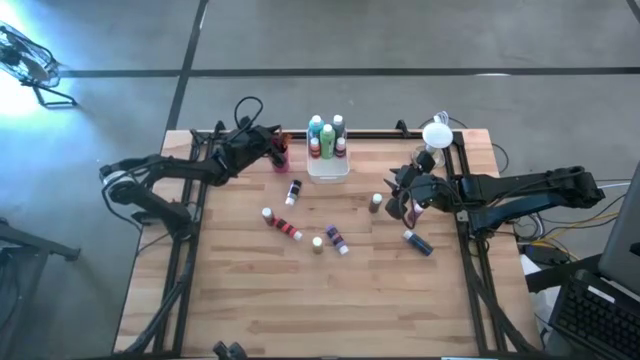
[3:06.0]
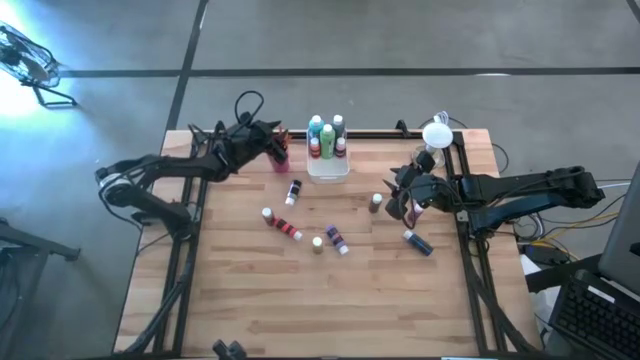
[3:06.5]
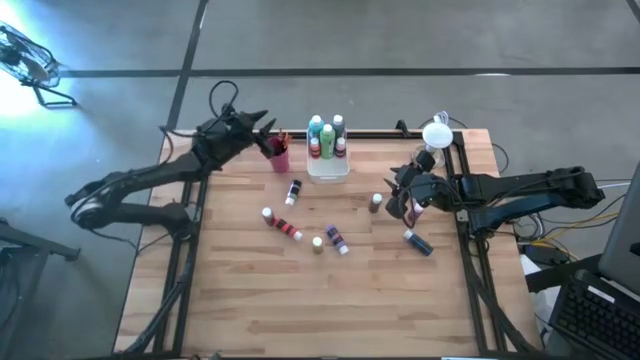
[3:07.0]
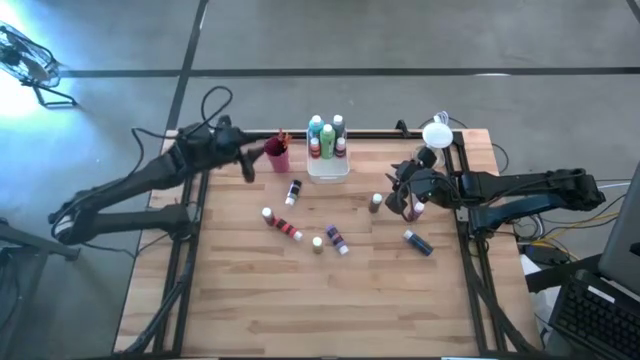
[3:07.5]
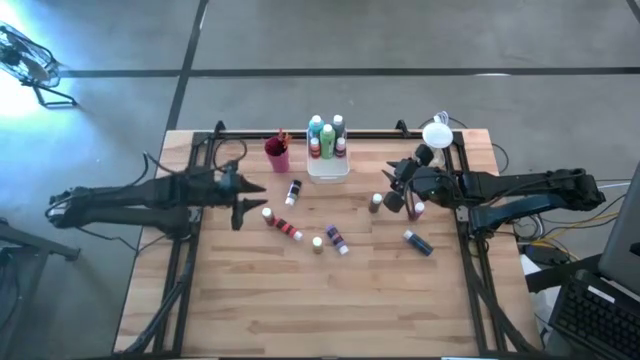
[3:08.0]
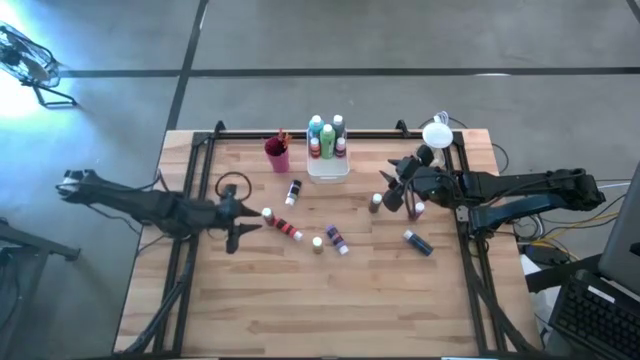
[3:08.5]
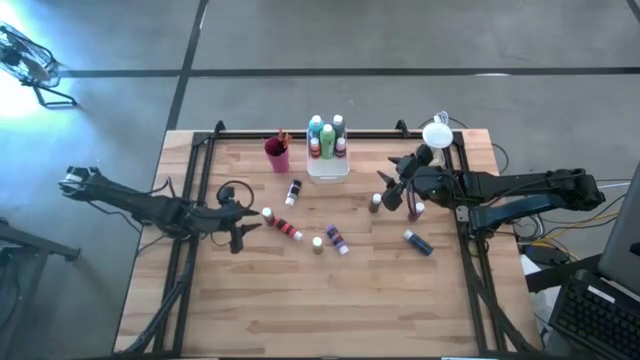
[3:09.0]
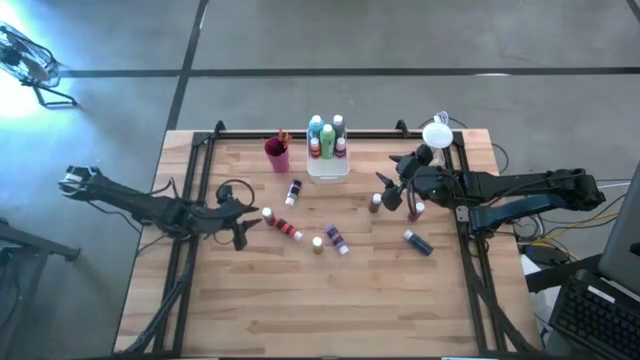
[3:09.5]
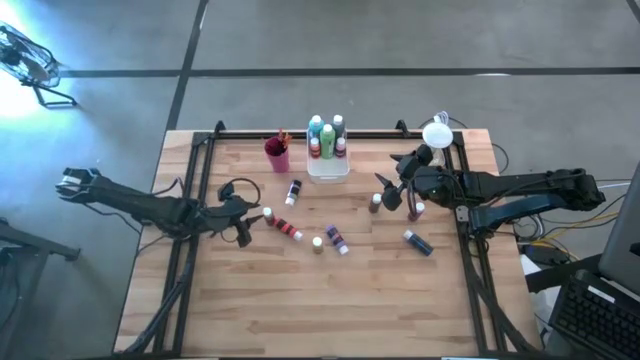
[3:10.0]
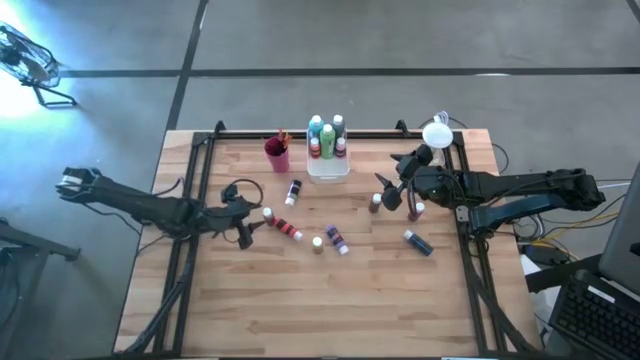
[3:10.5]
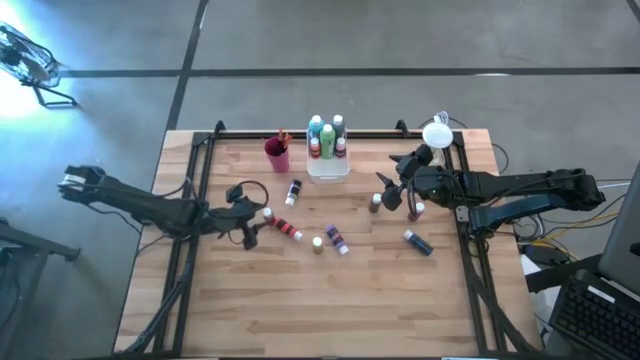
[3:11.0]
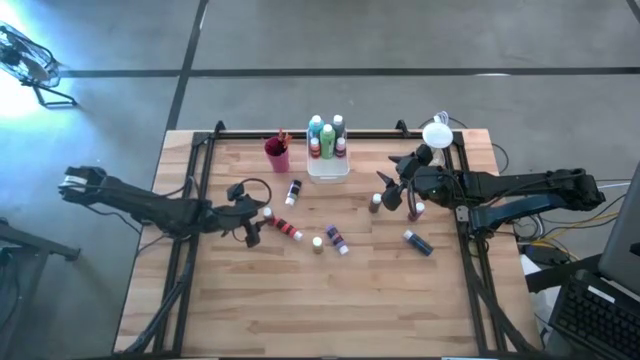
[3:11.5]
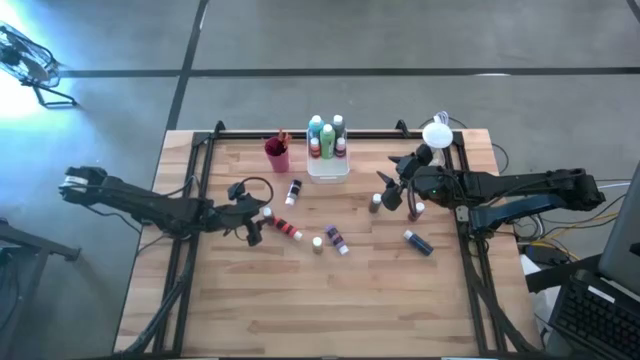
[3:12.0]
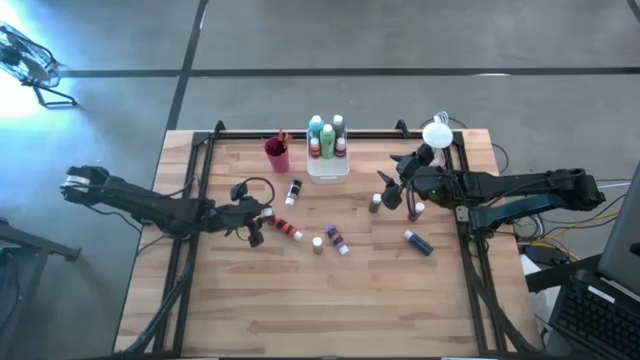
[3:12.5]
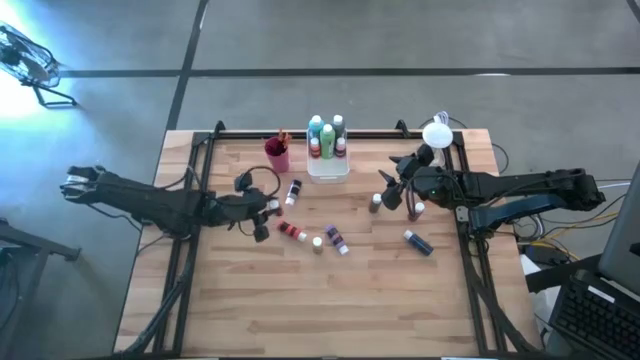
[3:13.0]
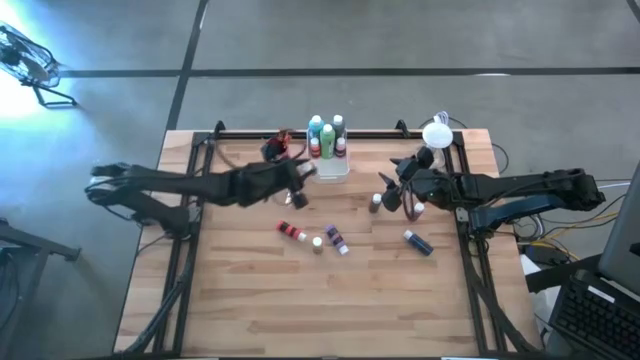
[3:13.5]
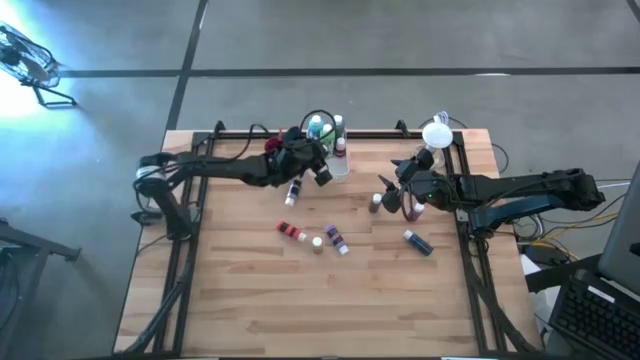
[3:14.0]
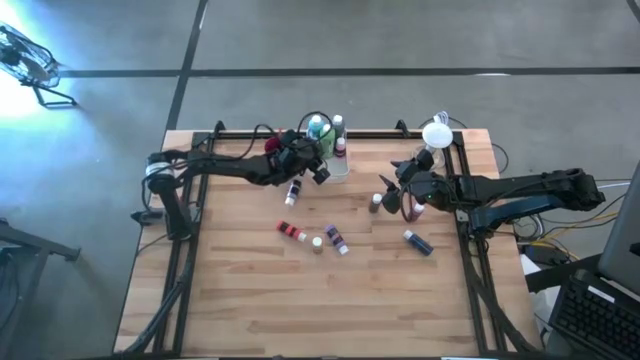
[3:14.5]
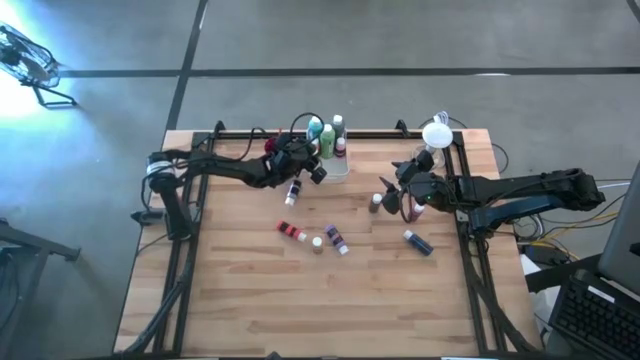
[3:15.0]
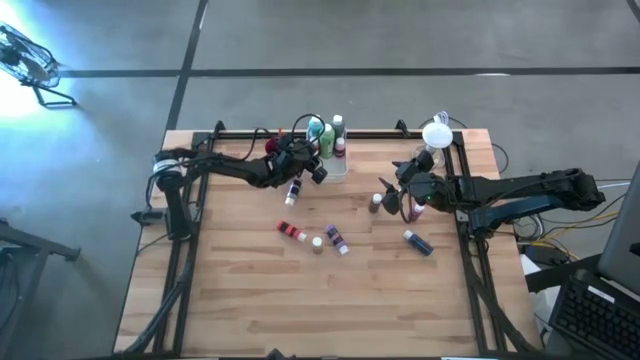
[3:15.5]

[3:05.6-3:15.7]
Task: Pick & Place Paint Supplies
Put the brown paint bottle into the white bin

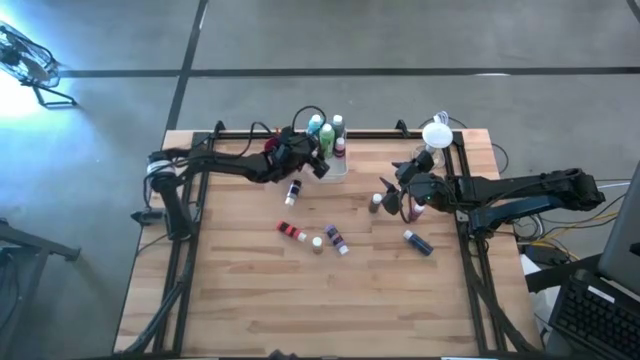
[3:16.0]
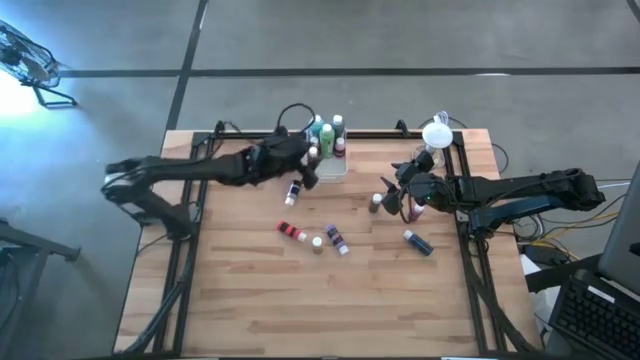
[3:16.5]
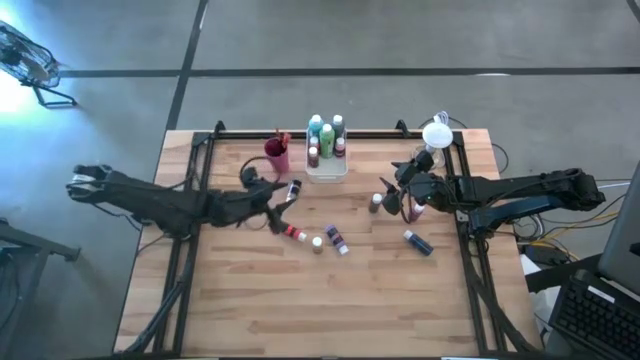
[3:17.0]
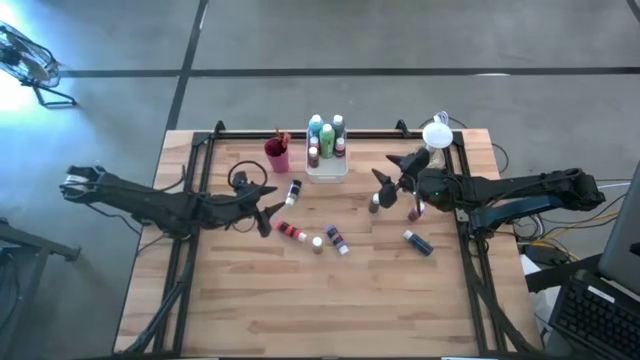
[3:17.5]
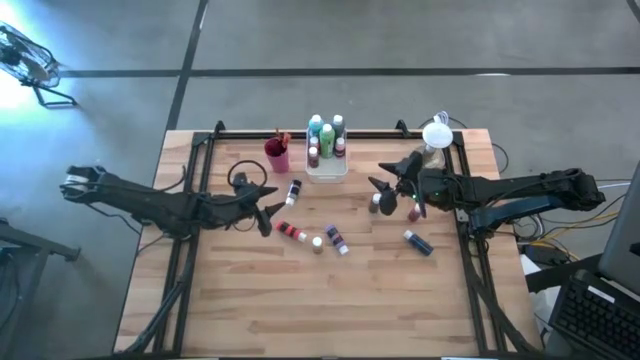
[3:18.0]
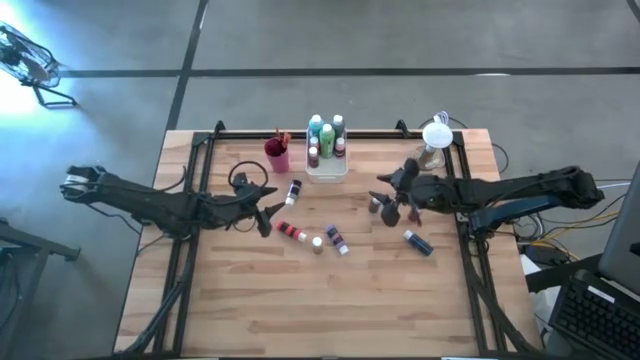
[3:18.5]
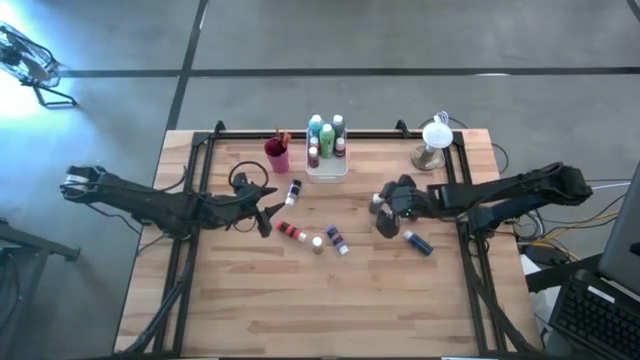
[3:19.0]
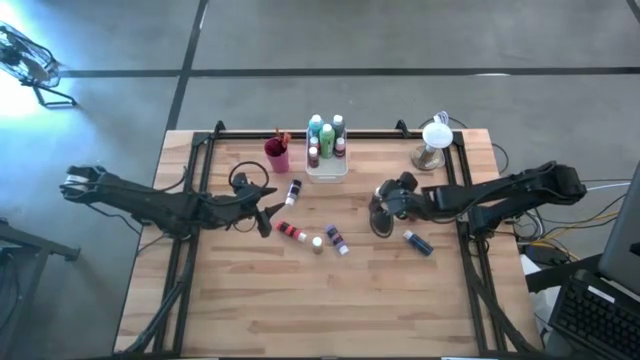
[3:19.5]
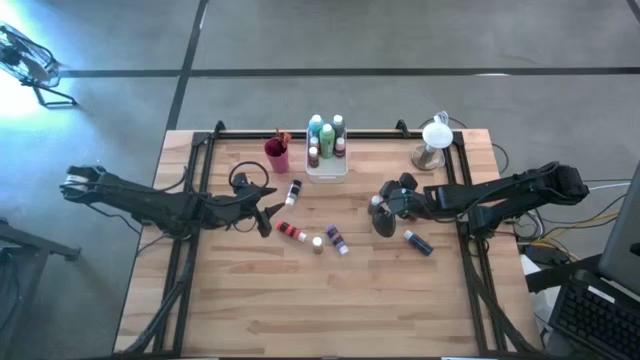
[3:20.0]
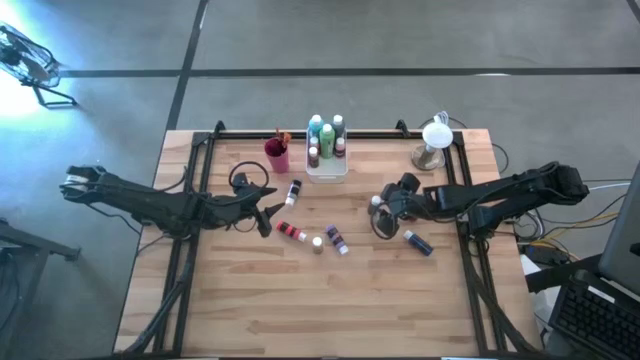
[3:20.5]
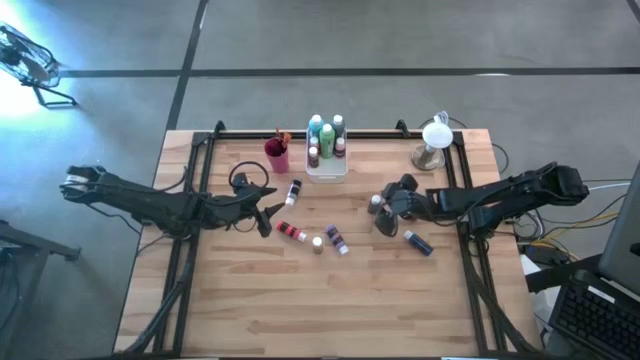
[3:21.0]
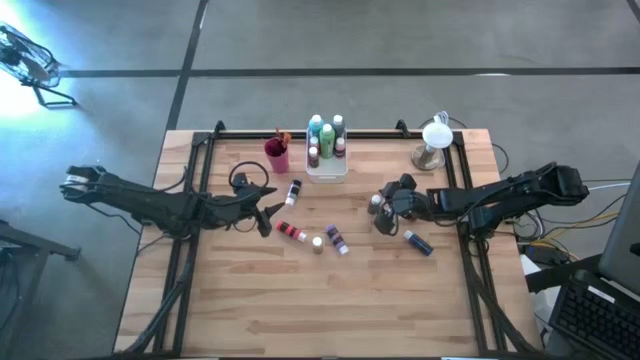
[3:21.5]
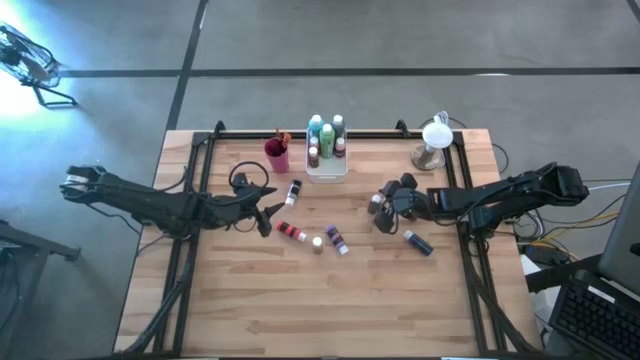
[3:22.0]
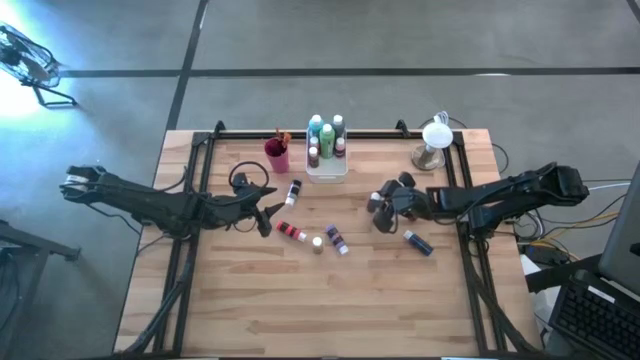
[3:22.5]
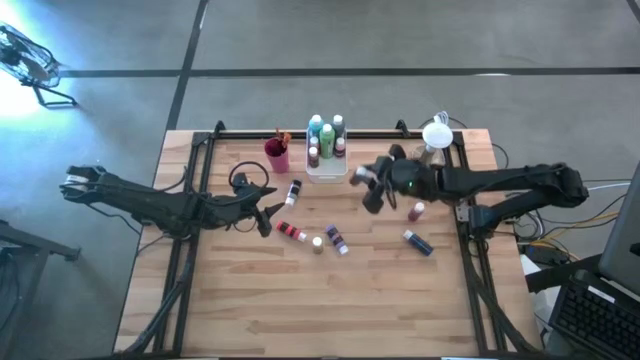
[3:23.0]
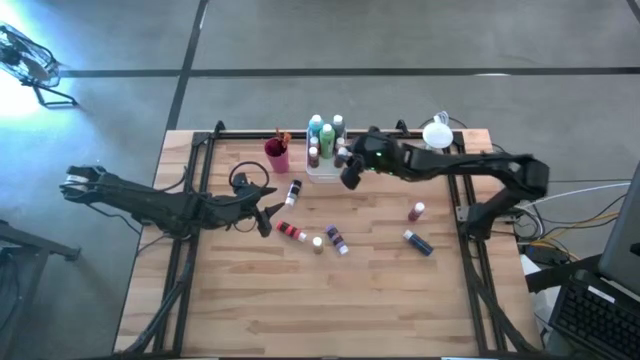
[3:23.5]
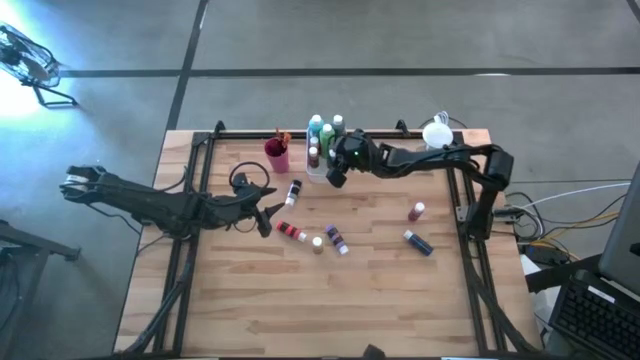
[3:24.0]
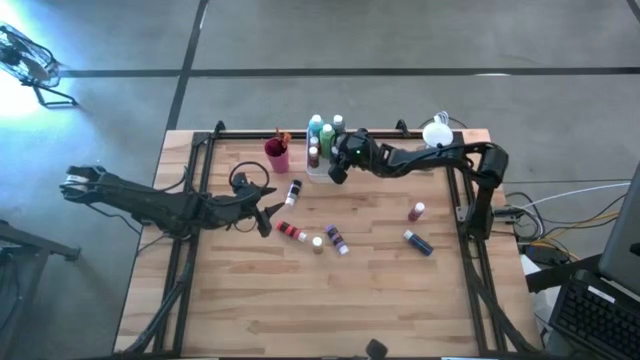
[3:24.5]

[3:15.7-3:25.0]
Put the dark brown bottle paint into the white bin
